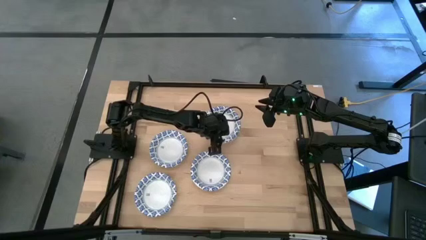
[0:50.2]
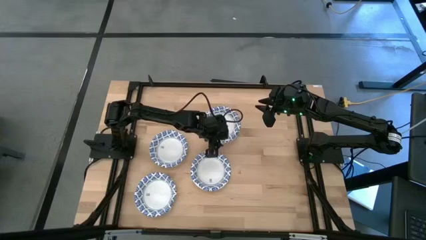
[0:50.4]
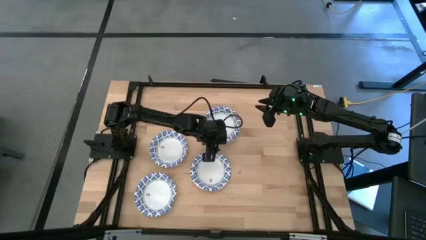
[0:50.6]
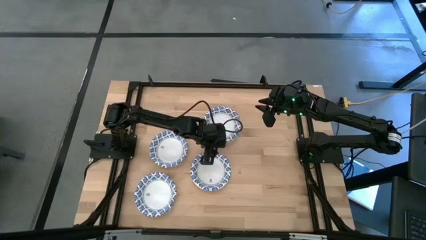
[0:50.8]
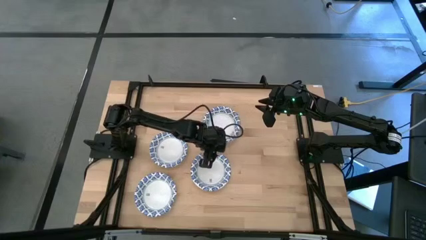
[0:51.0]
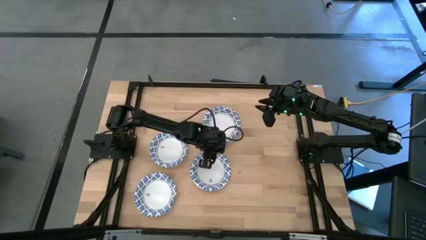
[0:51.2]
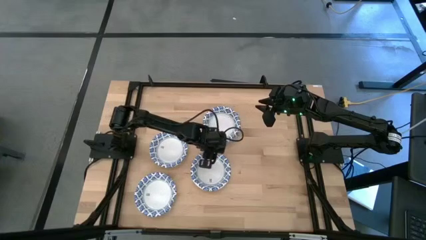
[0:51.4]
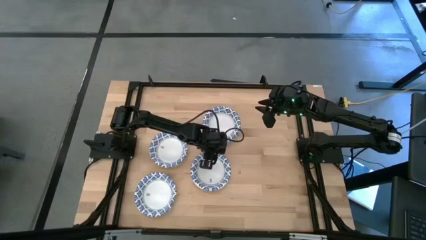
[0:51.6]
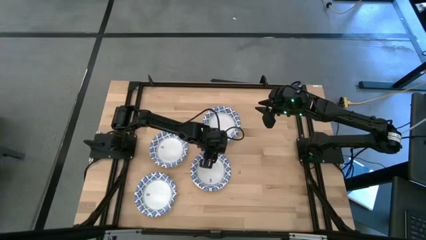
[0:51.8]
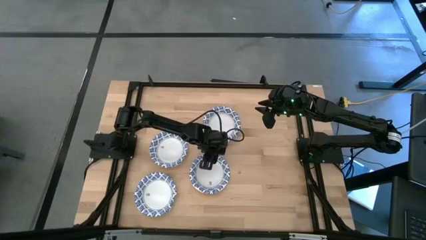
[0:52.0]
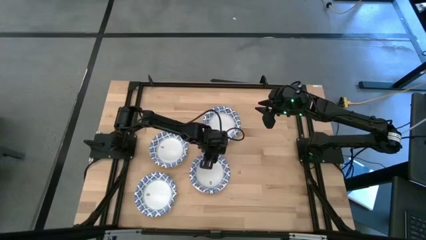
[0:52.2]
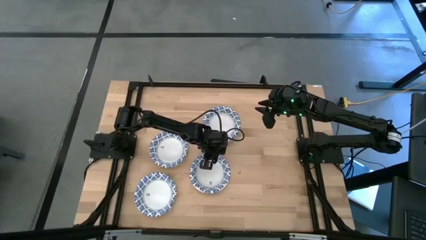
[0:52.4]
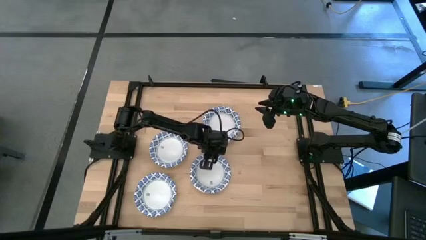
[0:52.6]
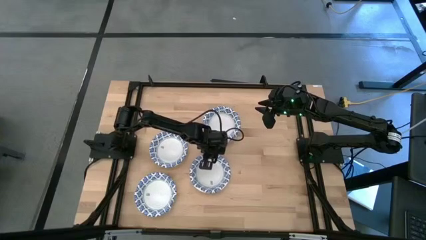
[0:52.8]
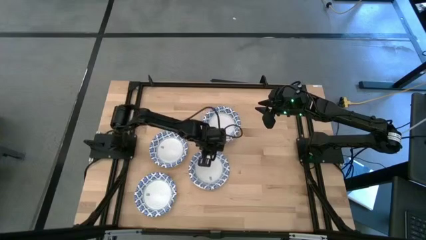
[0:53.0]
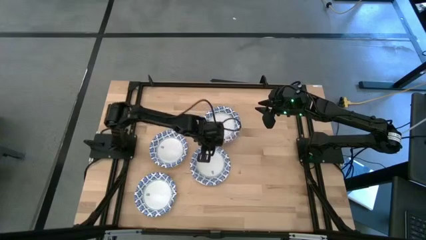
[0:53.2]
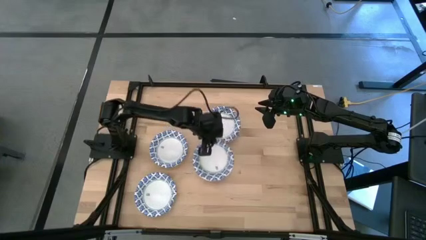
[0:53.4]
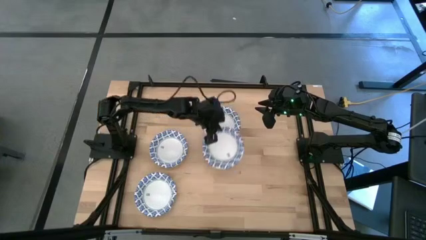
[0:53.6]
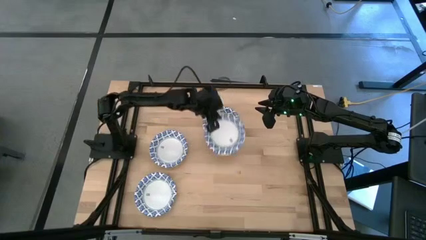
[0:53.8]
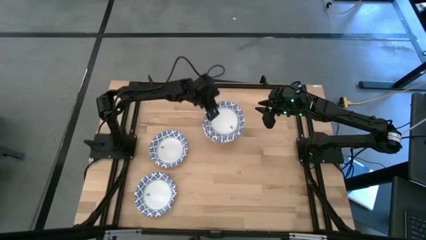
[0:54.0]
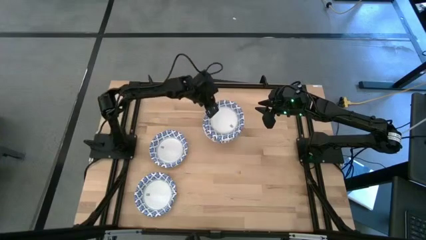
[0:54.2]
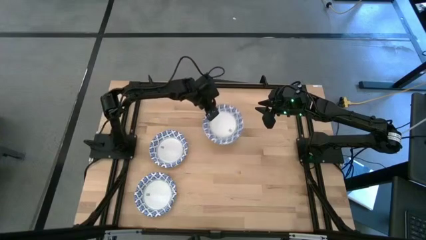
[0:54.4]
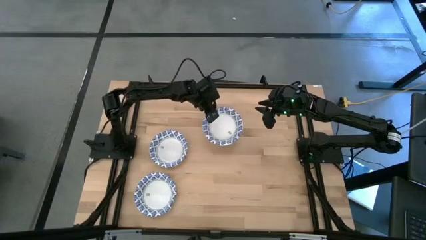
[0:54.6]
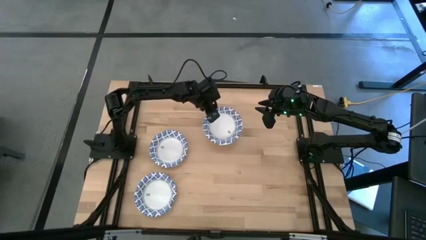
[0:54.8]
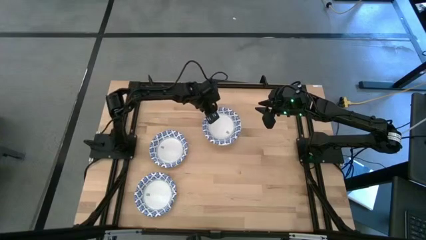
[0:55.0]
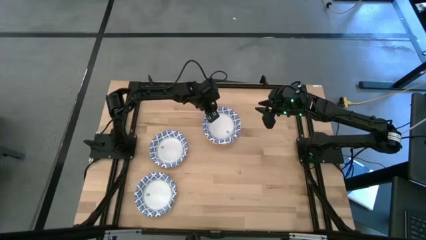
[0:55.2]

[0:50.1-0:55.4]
Task: Nest bowls inside each other
Stack the right bowl on top of the bowl on the table

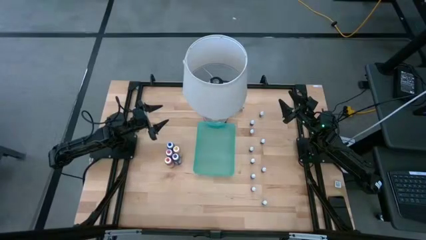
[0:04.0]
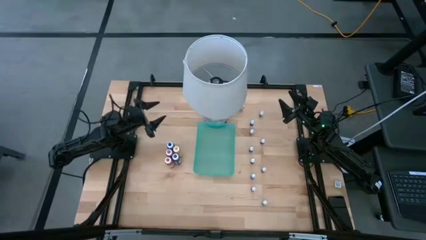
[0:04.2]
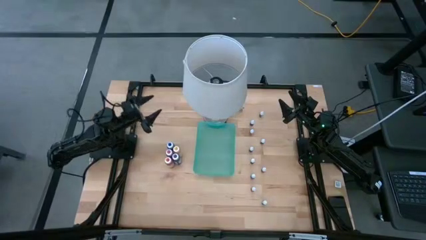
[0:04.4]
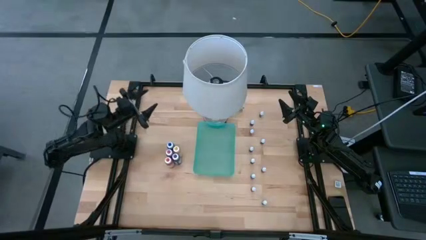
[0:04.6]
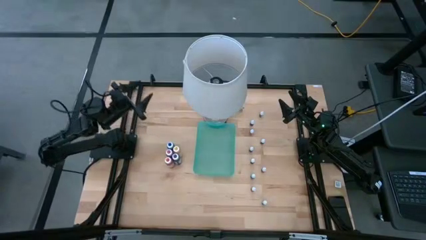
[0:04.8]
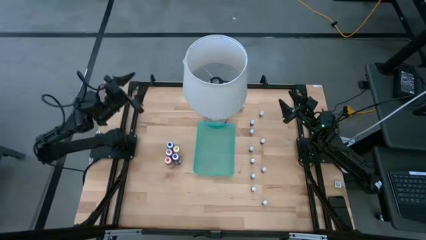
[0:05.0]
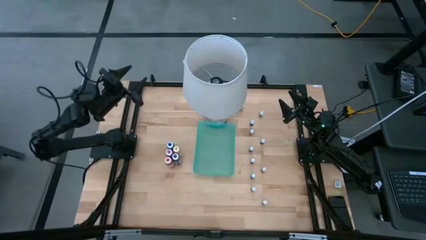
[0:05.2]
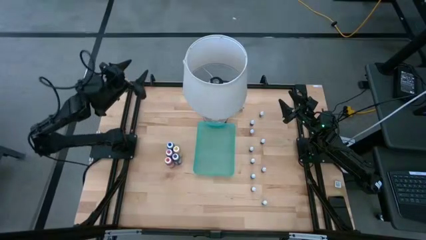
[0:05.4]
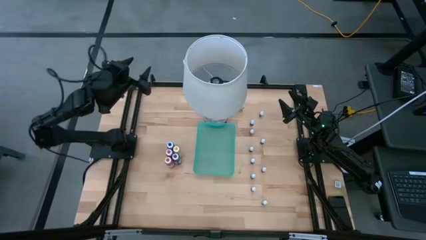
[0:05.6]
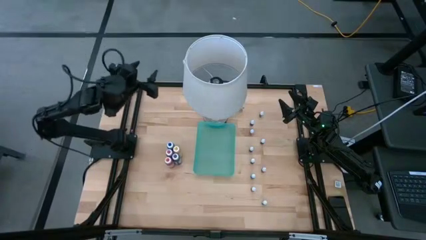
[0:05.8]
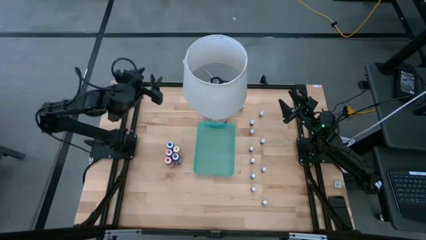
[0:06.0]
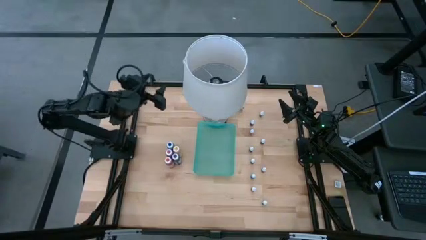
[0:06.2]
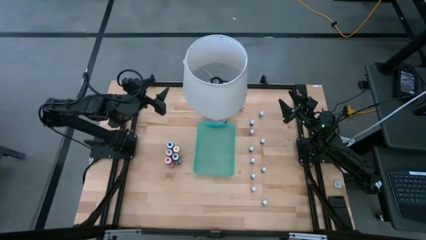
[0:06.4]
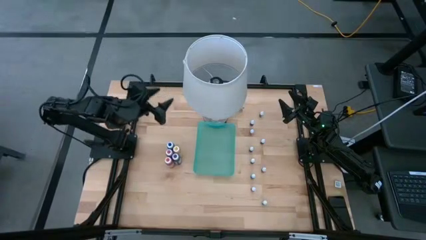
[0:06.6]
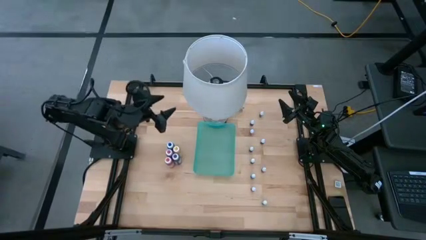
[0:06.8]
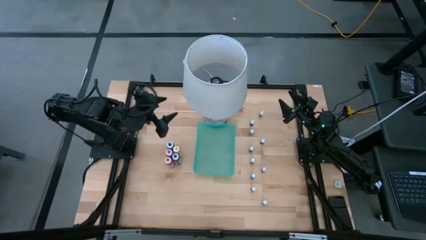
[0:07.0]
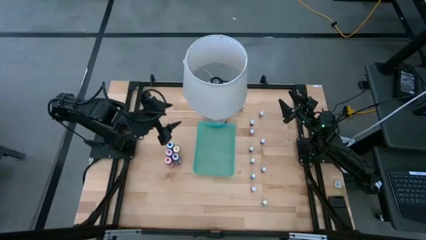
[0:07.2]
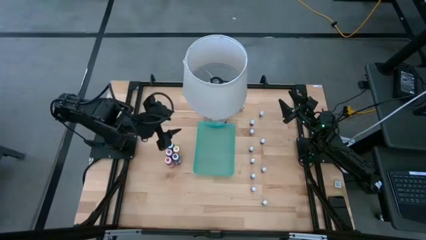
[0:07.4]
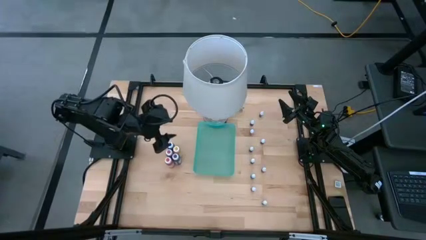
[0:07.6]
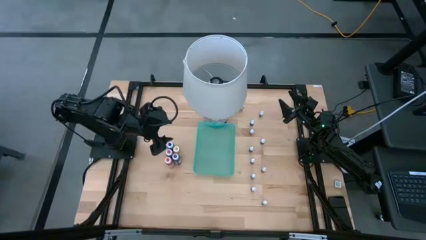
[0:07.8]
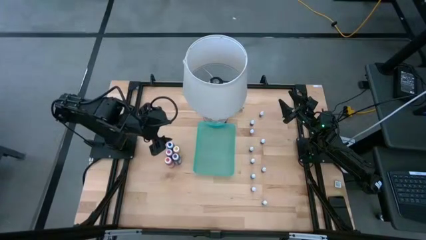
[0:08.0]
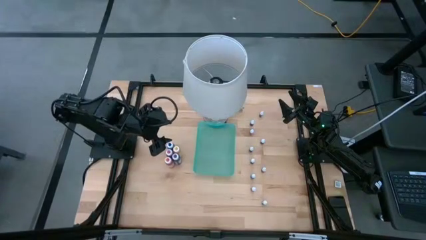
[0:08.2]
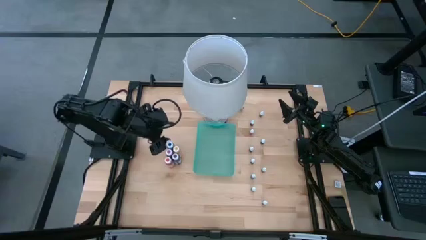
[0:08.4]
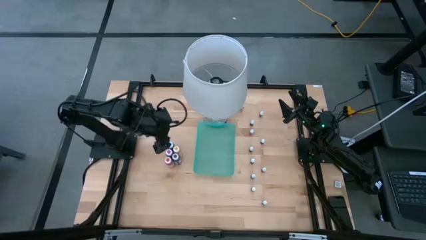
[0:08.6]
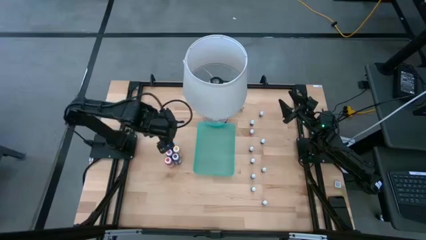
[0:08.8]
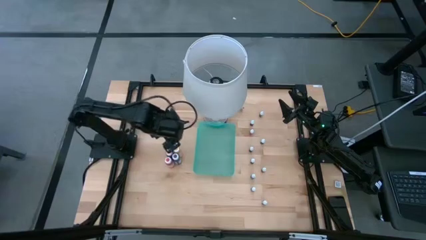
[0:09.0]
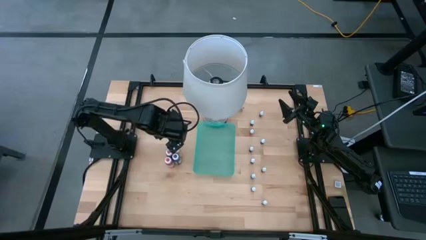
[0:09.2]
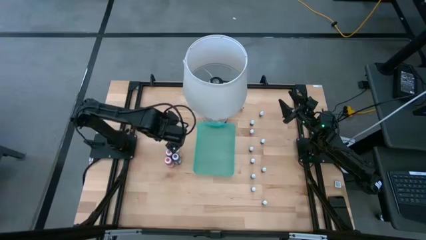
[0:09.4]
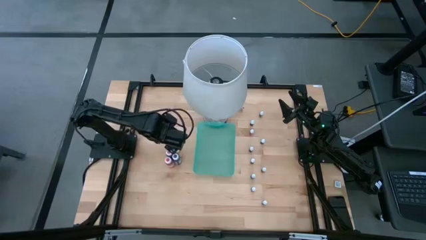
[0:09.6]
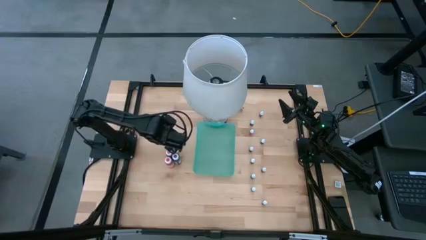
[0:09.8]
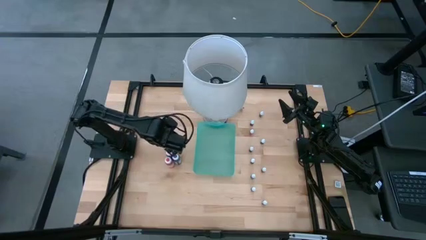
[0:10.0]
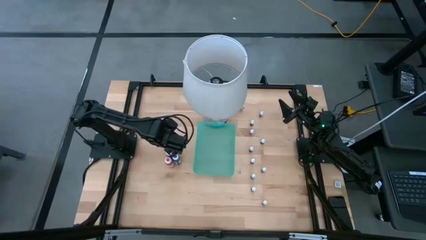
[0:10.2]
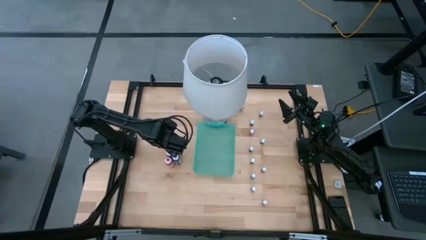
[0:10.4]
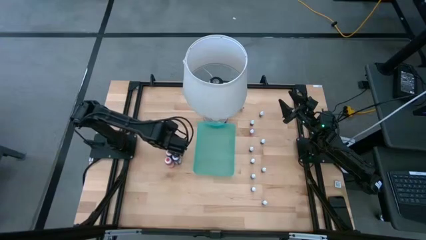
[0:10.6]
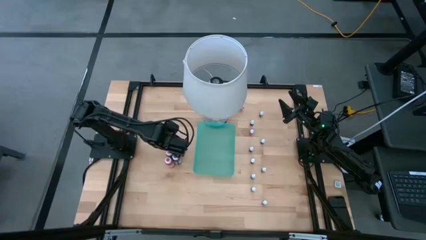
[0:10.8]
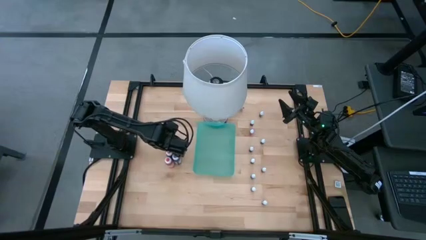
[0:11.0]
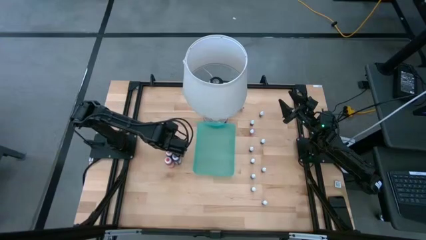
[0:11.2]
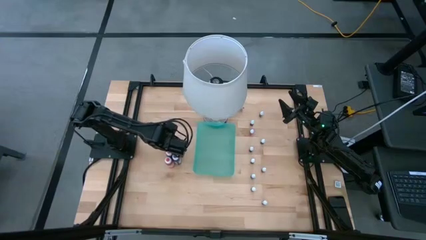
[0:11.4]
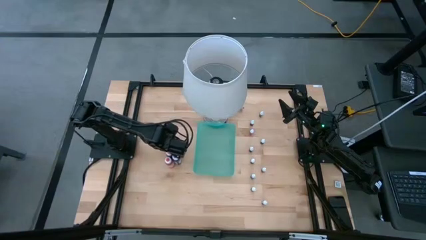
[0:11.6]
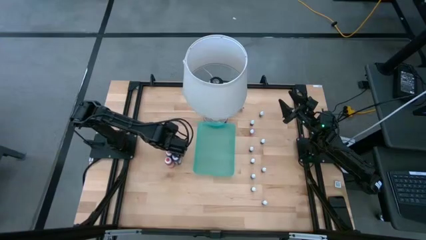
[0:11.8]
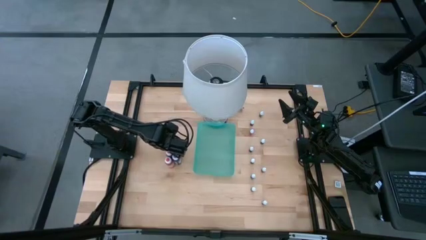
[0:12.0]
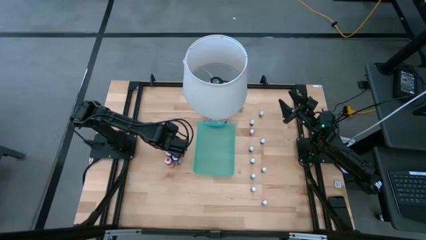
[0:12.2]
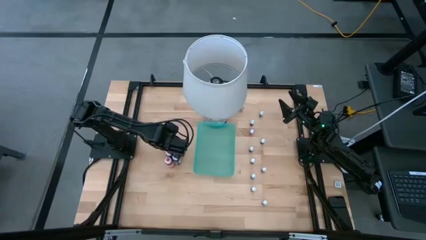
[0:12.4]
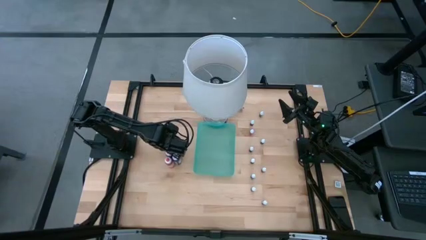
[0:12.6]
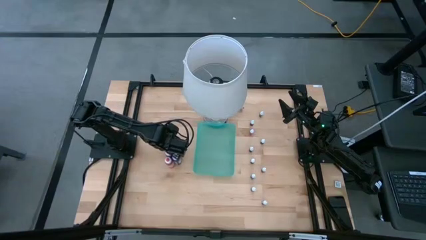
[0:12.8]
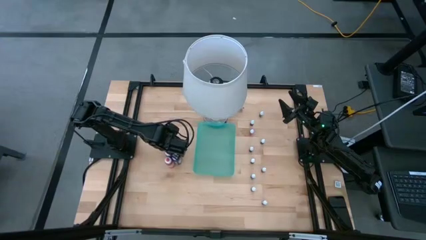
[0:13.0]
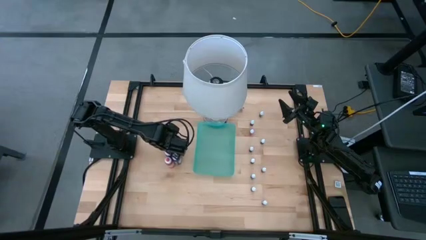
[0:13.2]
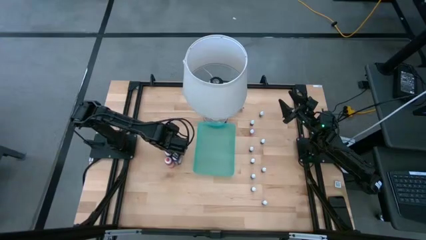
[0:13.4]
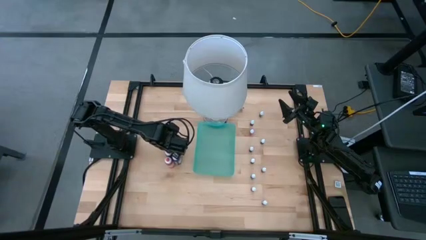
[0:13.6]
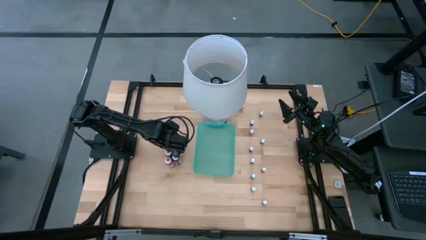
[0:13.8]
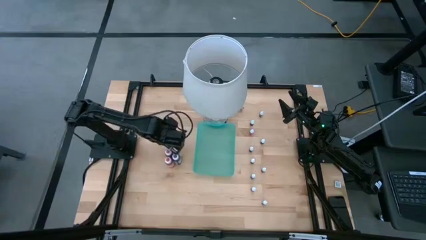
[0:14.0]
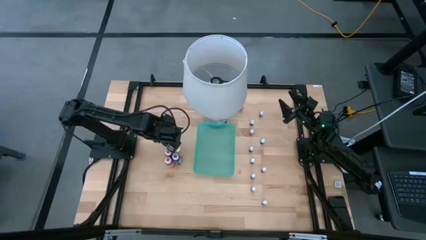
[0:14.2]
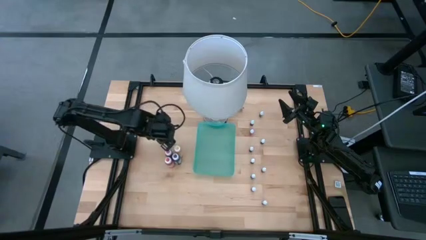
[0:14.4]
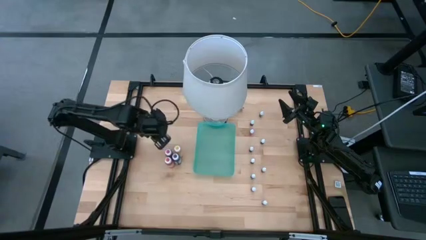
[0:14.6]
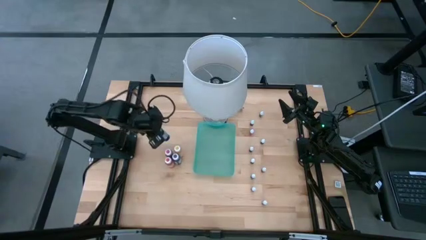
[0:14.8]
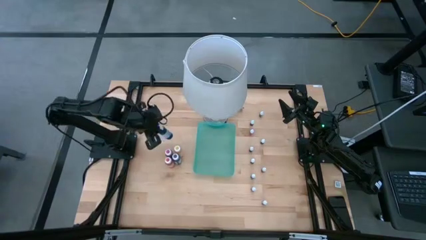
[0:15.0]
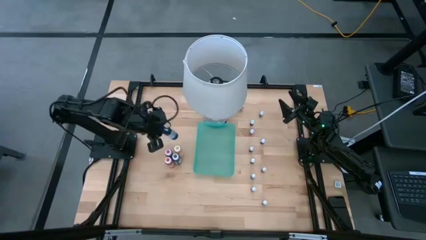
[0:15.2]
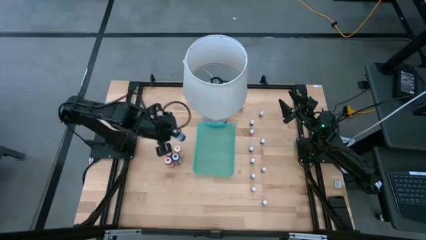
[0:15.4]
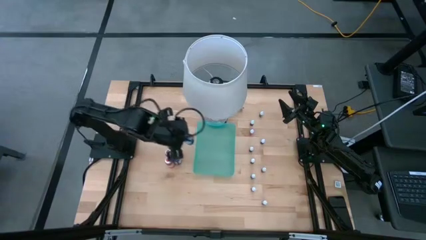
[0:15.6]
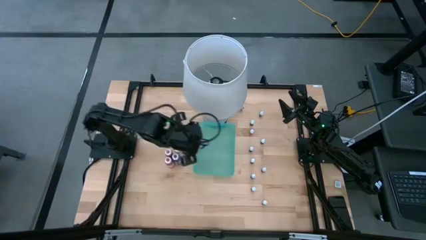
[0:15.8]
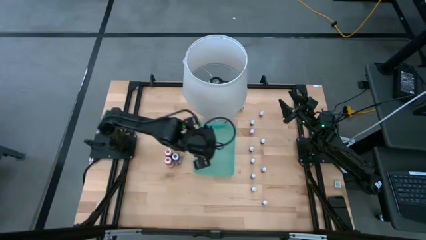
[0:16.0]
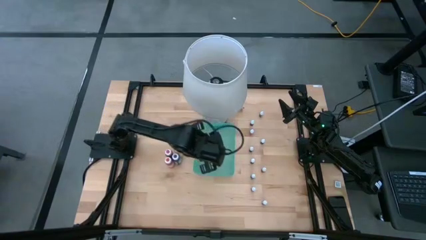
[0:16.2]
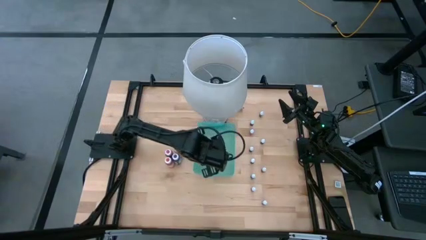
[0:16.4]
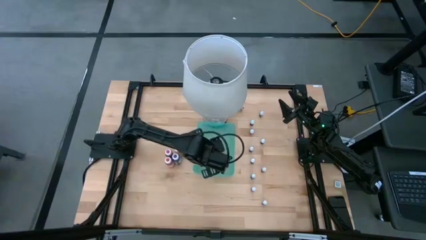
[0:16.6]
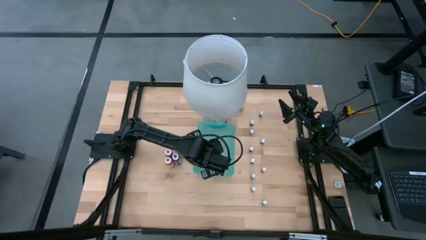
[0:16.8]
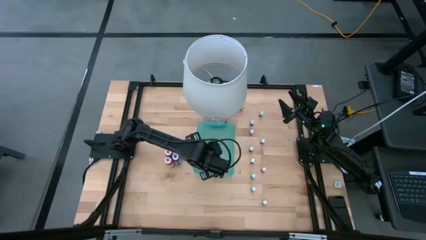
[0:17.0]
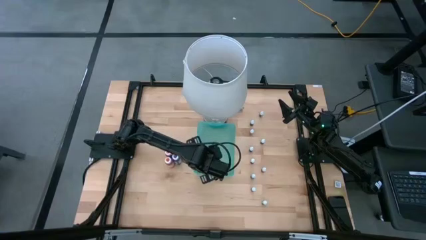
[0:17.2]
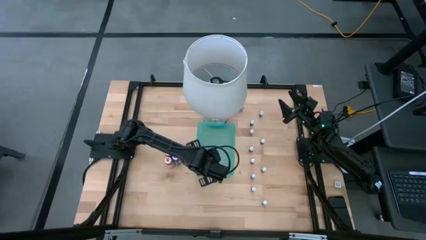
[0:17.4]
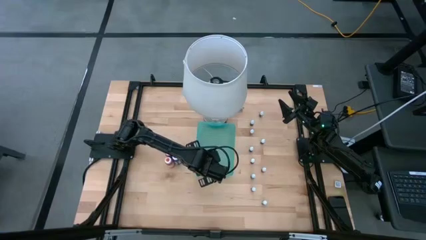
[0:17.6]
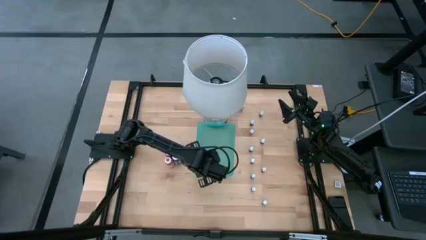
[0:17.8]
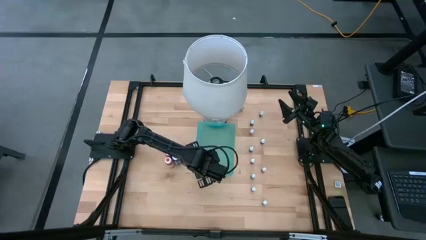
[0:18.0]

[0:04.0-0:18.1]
Task: Pick & Place food coloring
Put the large blue food coloring bottle into the green bin
